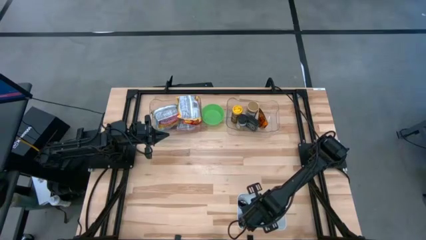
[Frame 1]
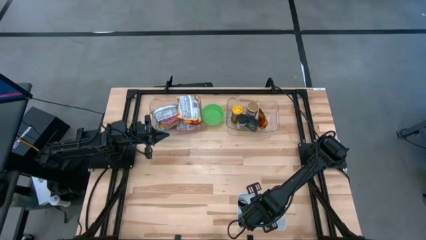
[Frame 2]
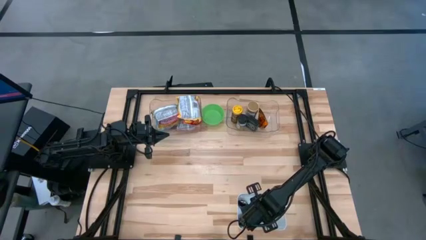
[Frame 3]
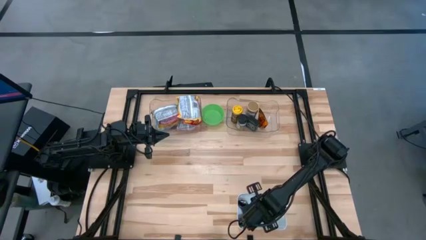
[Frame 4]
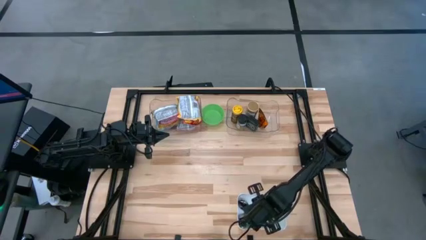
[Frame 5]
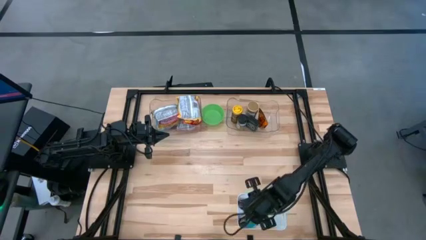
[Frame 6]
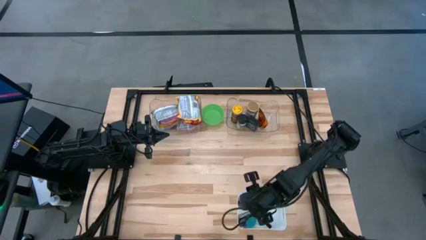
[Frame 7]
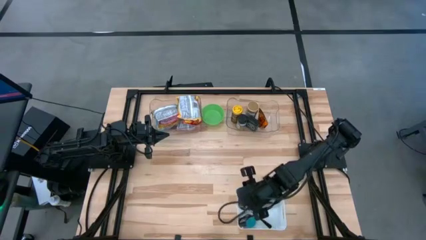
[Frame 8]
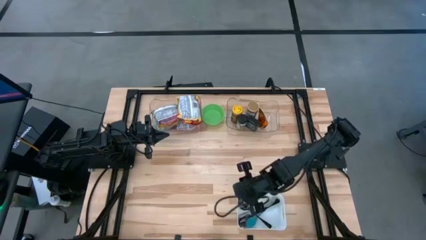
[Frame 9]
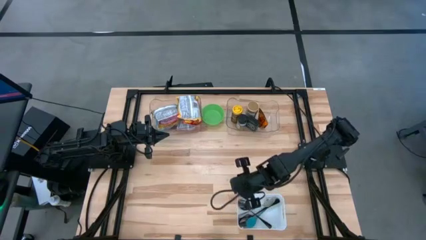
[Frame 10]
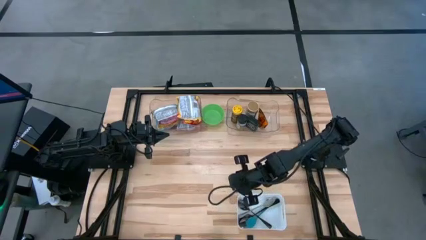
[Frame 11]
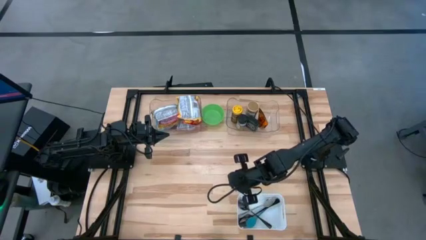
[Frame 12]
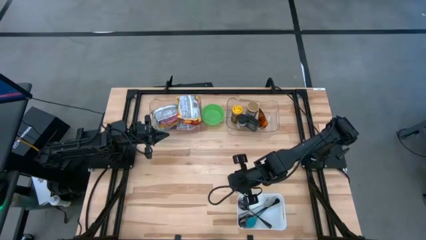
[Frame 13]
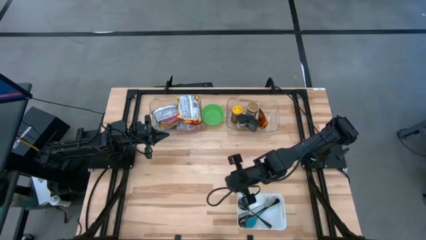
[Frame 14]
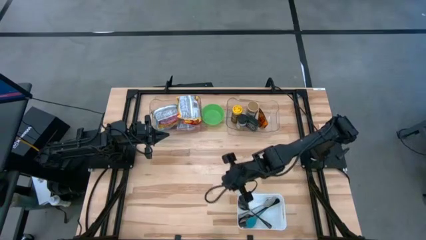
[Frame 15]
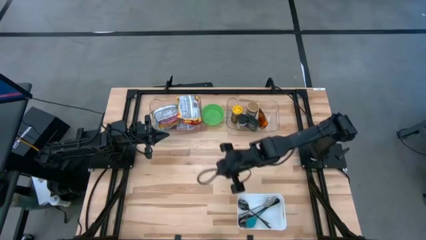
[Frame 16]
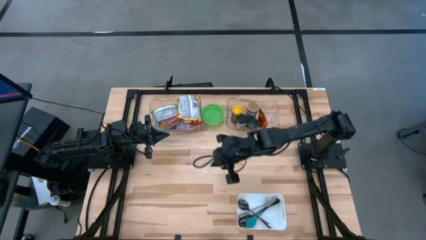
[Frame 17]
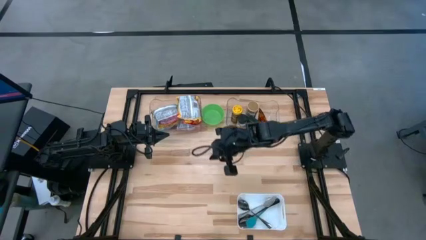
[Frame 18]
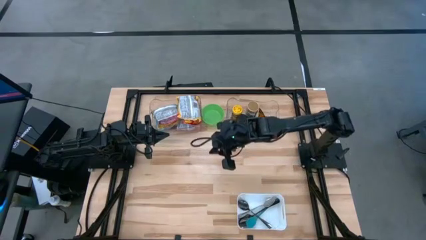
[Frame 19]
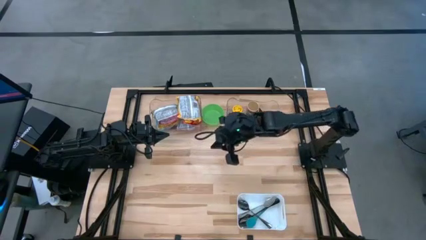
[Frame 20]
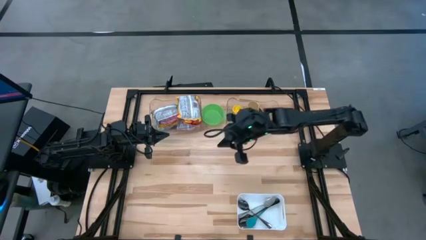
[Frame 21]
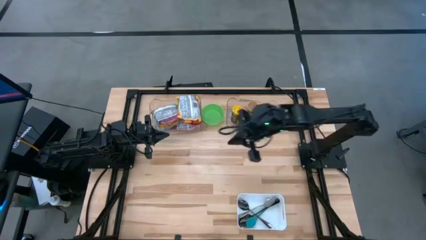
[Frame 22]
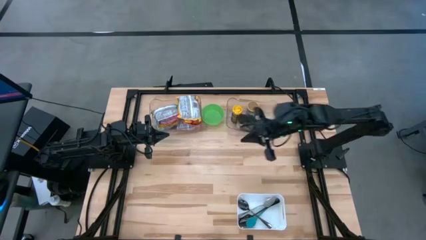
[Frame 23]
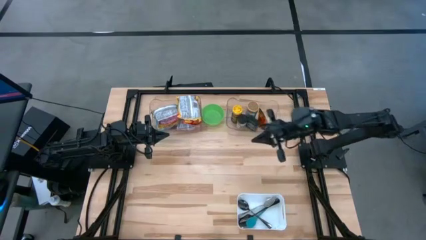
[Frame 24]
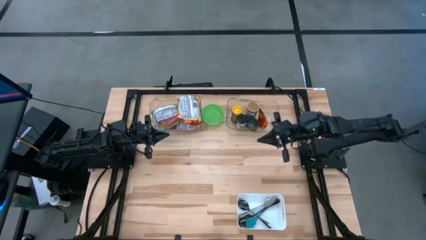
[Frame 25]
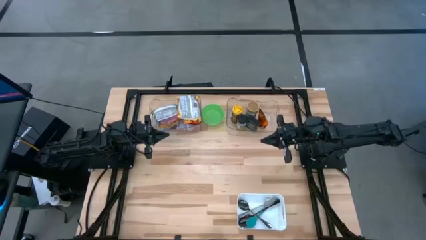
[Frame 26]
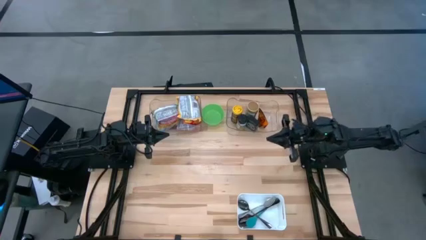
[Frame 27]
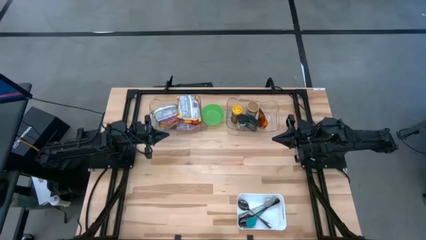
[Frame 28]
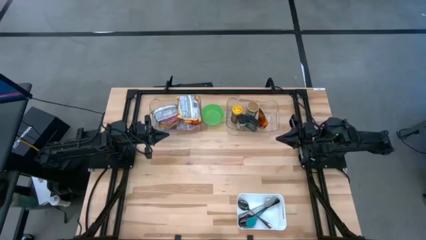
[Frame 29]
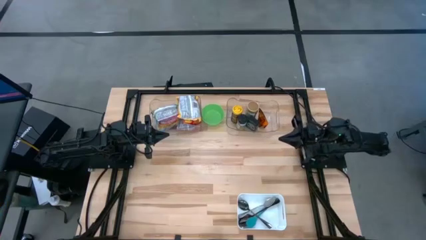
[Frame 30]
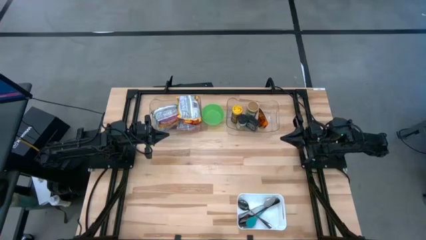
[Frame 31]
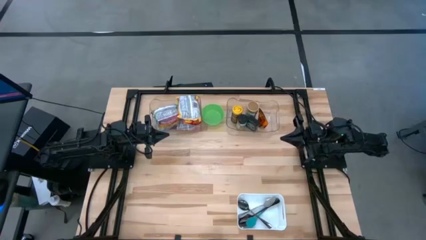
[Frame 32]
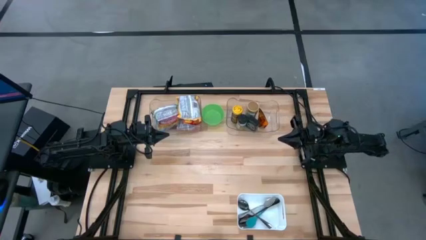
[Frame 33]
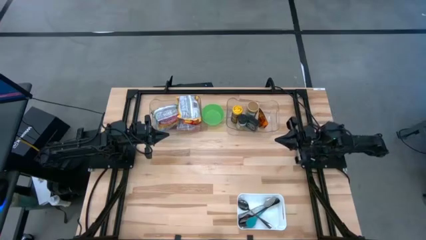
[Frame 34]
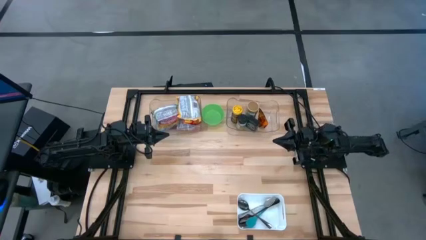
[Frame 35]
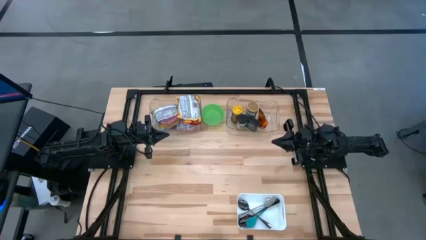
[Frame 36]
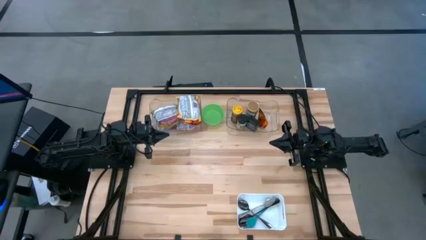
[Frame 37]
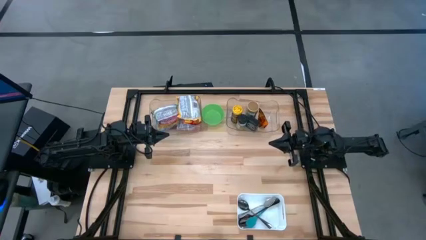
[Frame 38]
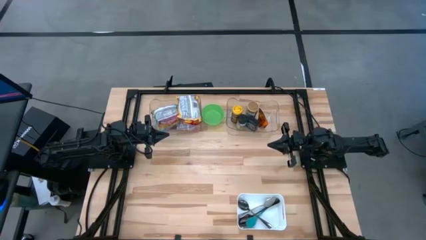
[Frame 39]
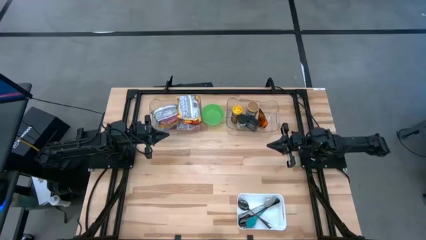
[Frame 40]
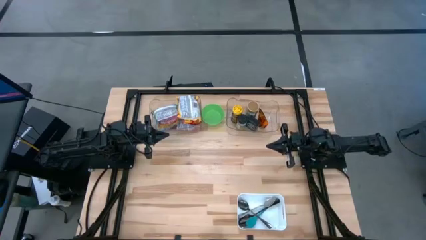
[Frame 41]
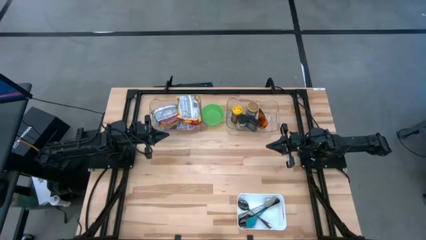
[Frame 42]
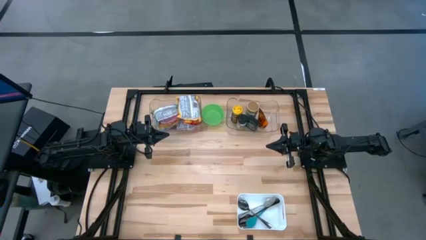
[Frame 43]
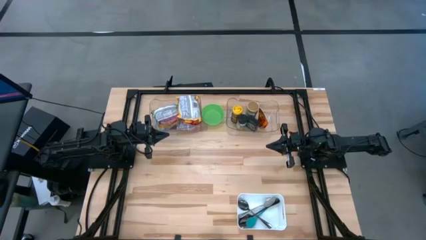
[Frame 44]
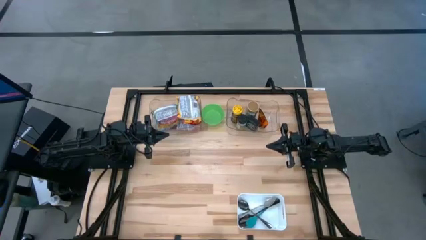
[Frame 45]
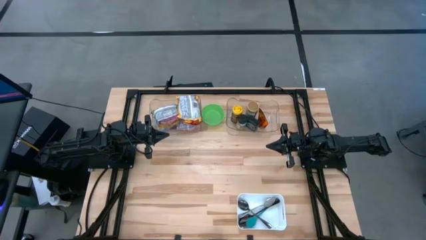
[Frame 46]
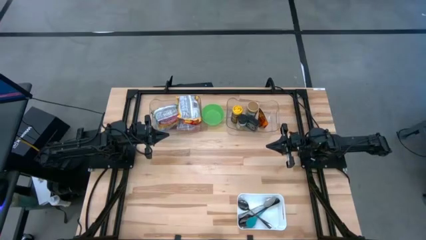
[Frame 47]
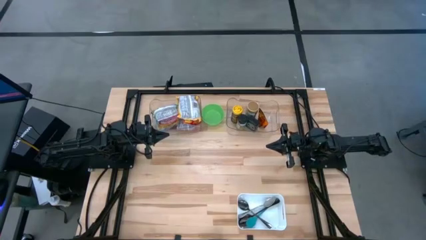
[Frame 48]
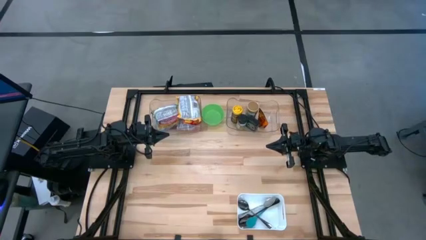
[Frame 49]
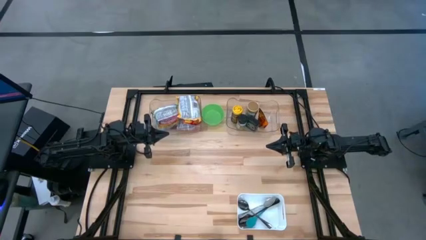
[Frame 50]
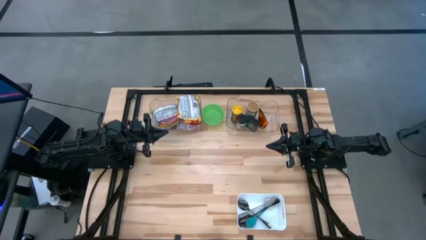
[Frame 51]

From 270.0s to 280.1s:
Task: Pick & Place Food Item
Return to Home Position

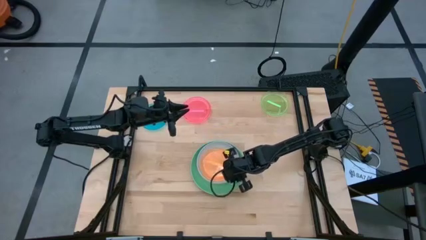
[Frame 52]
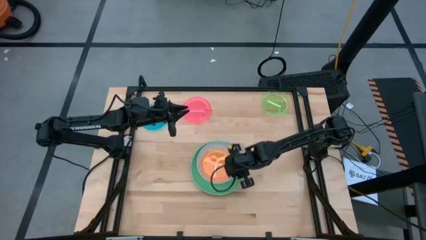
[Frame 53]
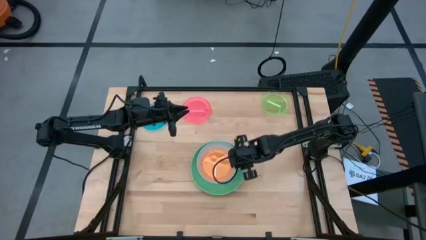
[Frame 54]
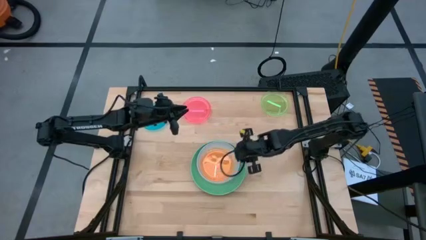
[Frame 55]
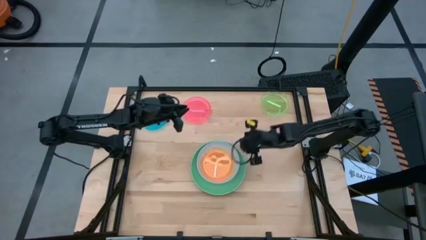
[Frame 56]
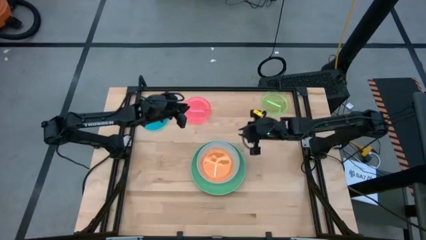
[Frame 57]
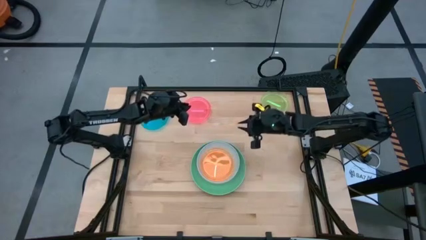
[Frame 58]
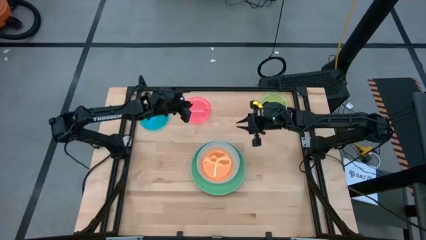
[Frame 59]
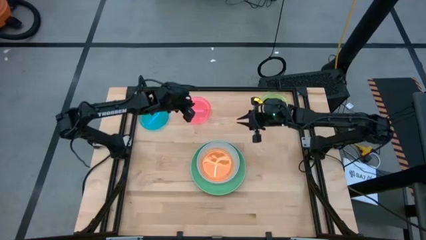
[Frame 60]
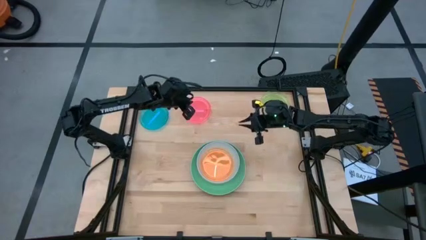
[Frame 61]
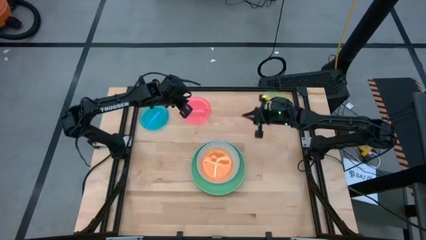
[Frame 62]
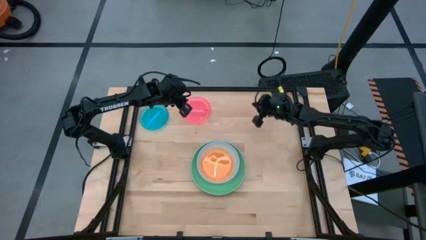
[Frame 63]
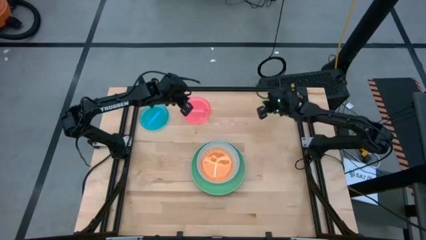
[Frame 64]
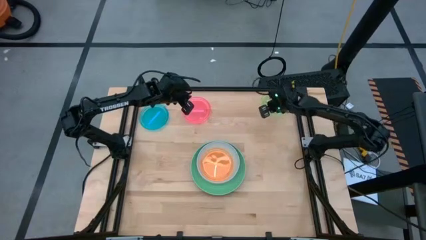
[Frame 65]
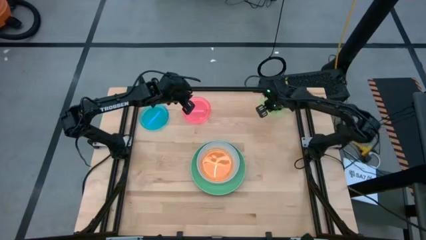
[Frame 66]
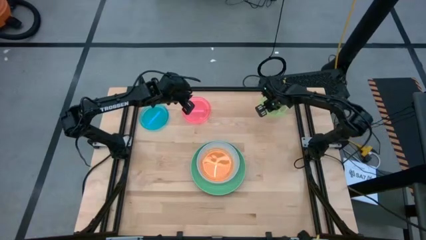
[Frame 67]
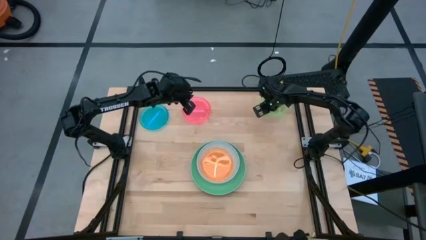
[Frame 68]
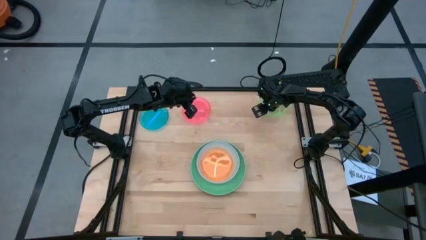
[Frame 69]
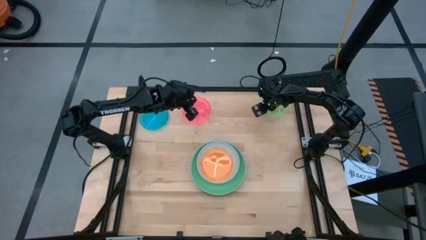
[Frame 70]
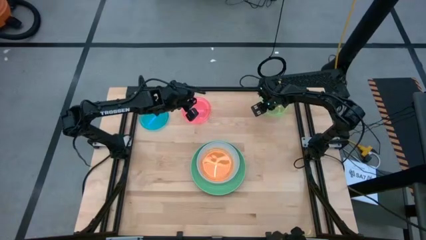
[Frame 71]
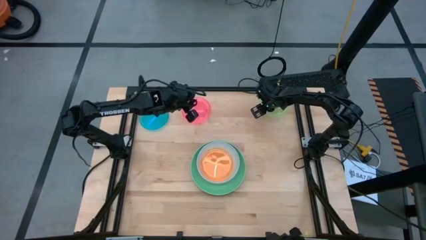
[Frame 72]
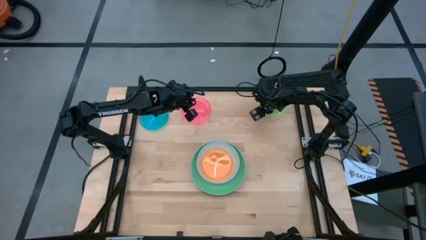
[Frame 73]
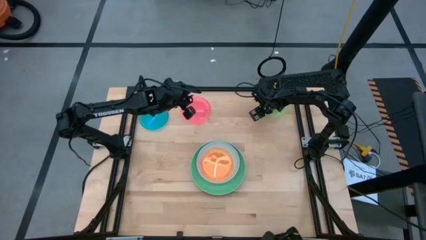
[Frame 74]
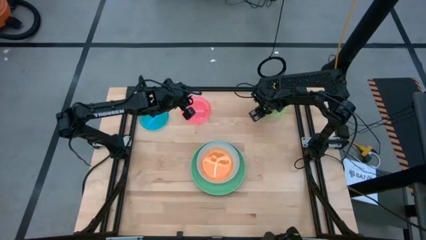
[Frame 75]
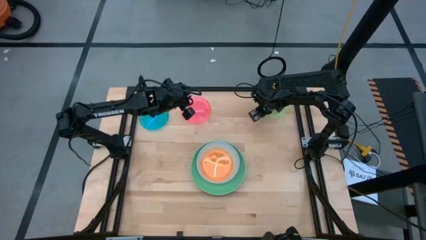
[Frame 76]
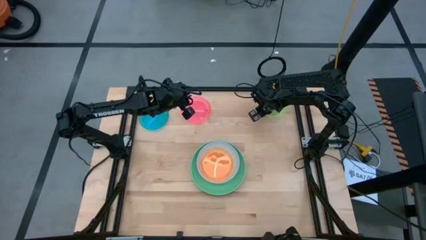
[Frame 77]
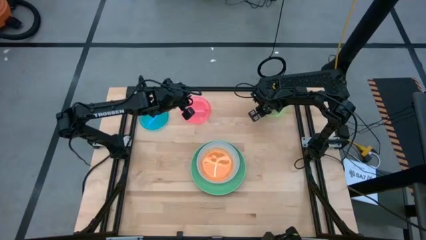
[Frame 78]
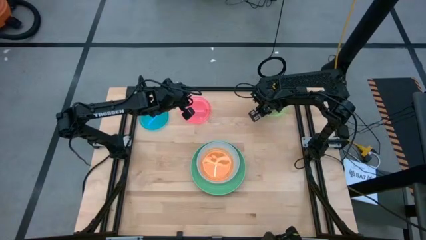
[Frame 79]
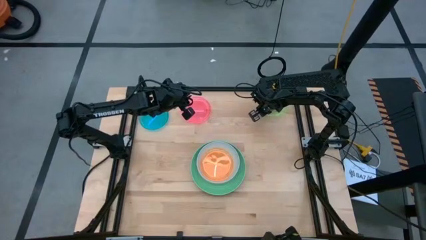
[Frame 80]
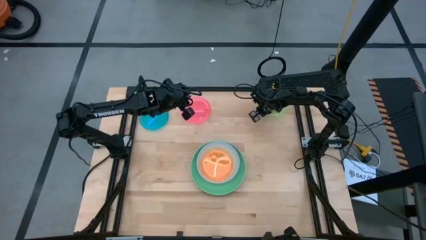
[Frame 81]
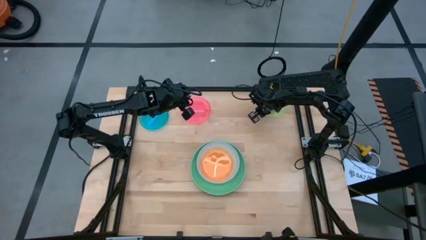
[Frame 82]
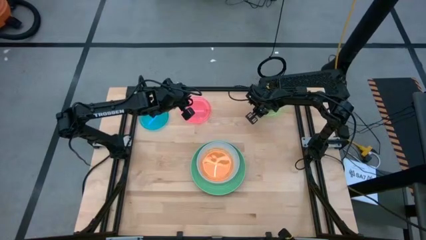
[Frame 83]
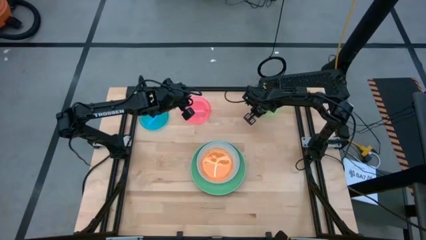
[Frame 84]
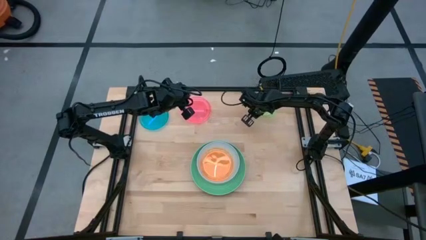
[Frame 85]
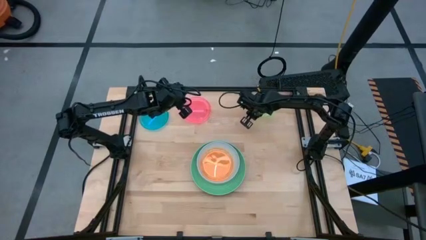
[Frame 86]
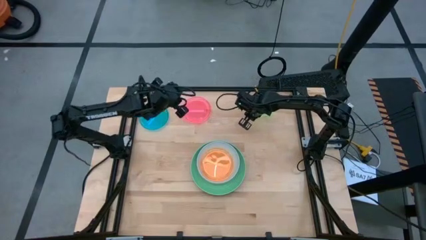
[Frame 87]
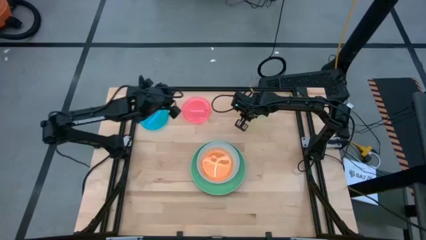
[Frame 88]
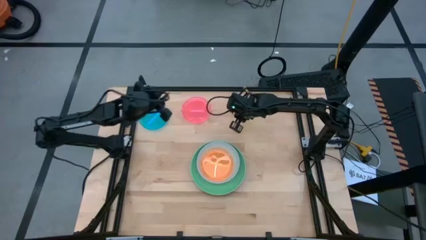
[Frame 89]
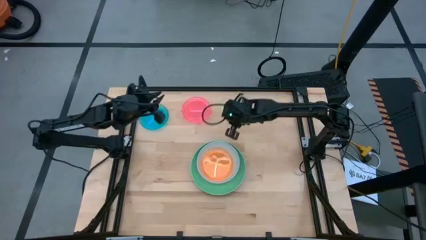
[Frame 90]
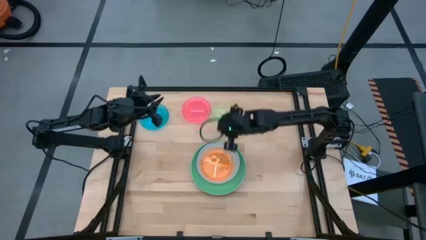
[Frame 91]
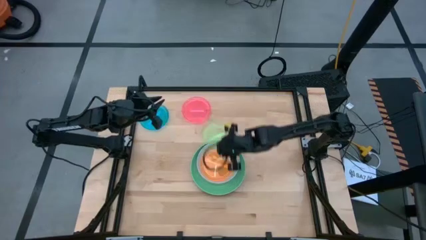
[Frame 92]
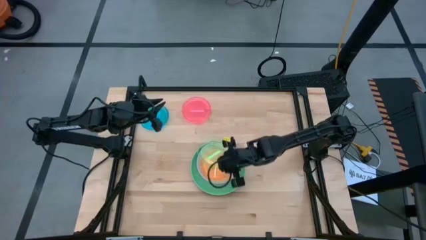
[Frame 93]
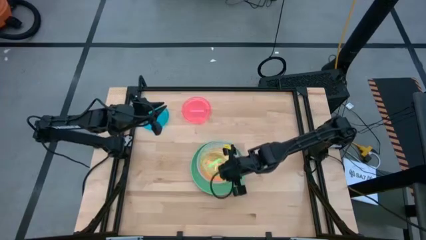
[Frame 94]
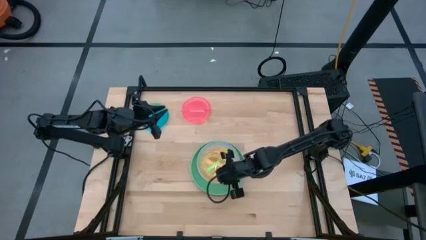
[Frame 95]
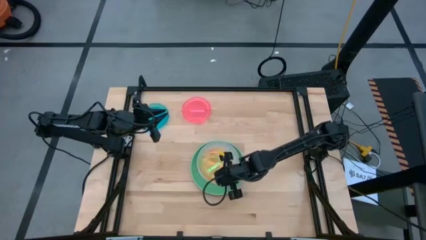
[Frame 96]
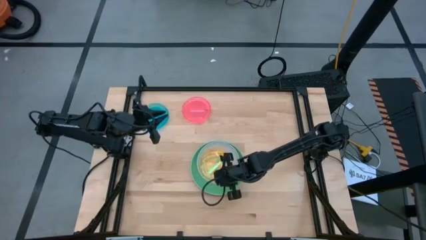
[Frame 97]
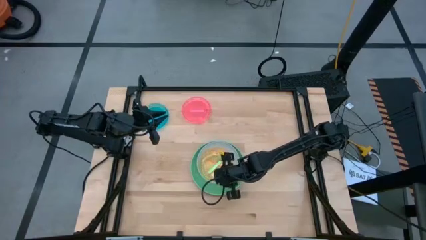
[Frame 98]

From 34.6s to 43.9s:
Task: Stack plastic plates
Stack the green transparent plate on the orange transparent plate
